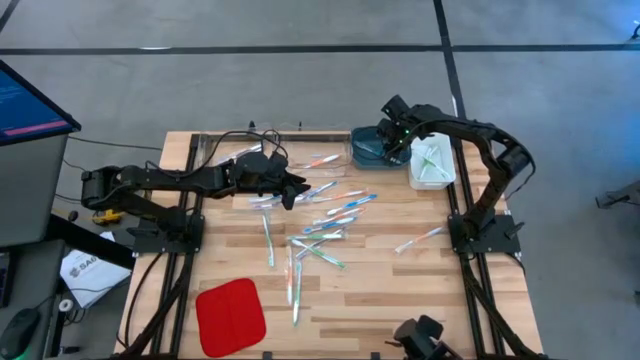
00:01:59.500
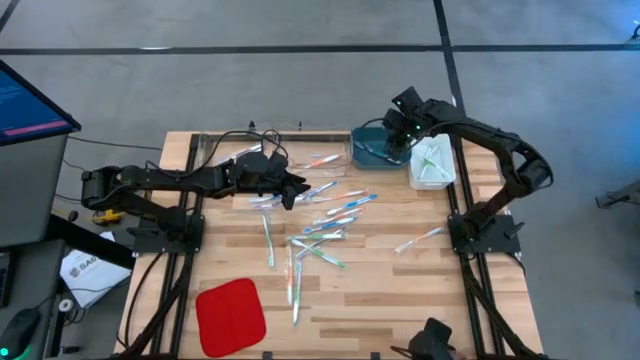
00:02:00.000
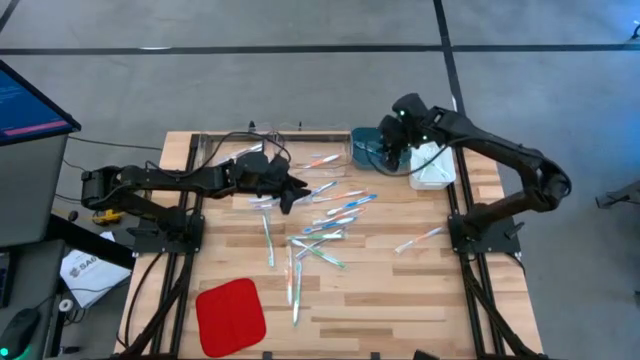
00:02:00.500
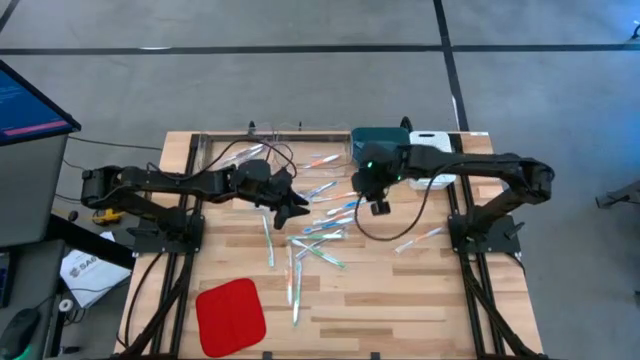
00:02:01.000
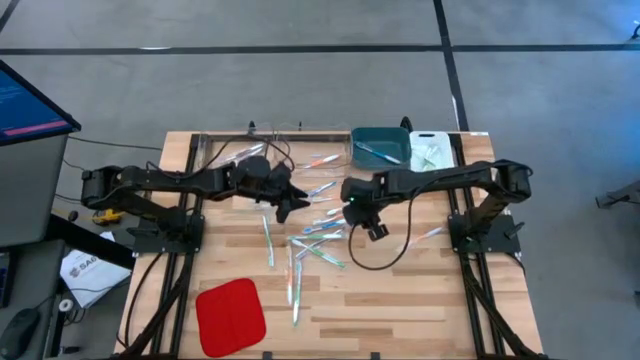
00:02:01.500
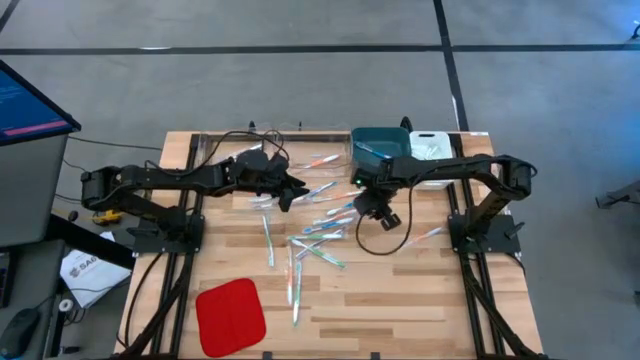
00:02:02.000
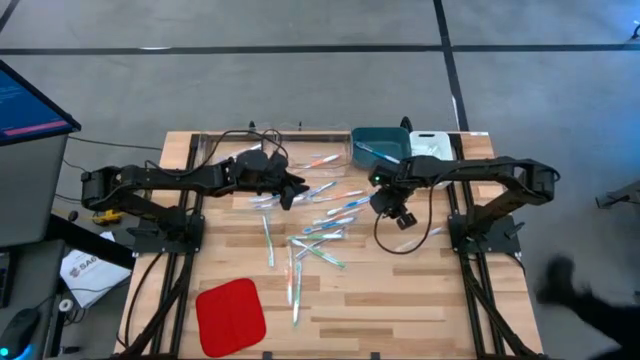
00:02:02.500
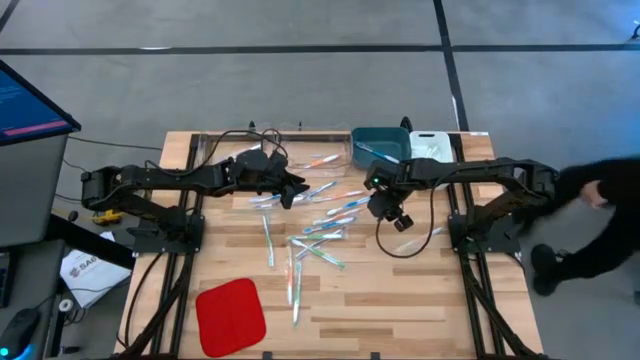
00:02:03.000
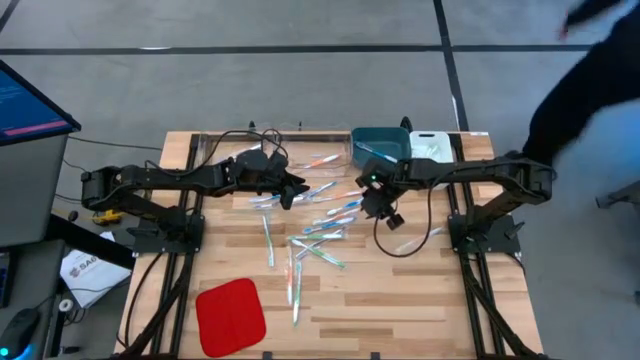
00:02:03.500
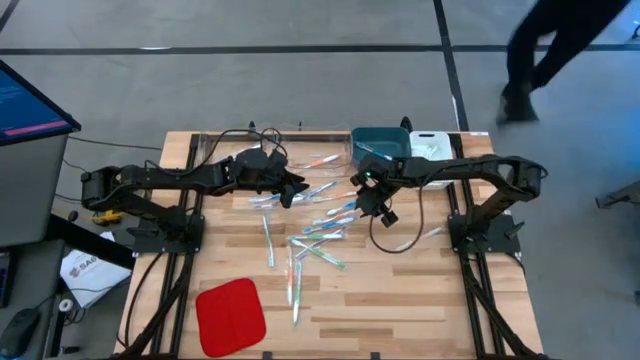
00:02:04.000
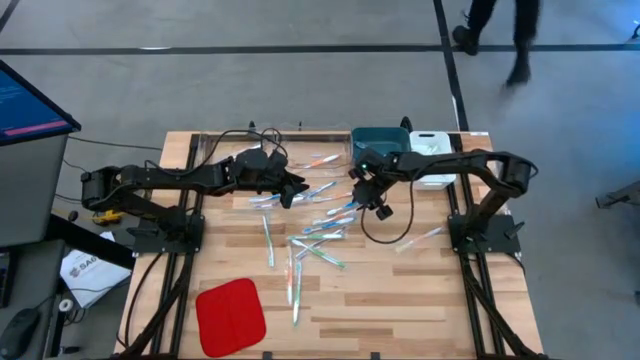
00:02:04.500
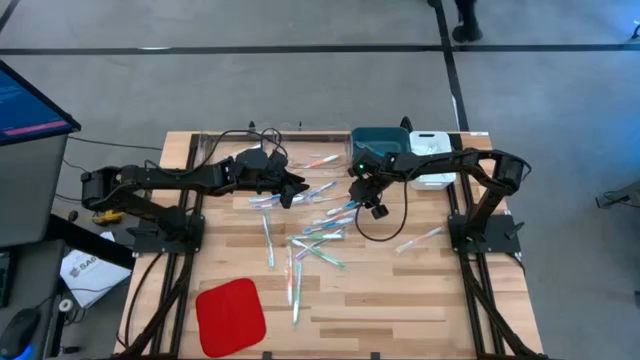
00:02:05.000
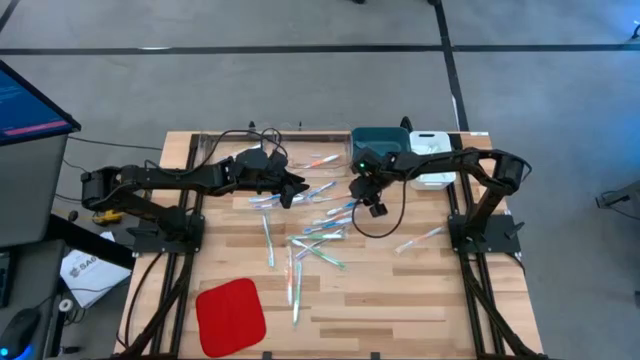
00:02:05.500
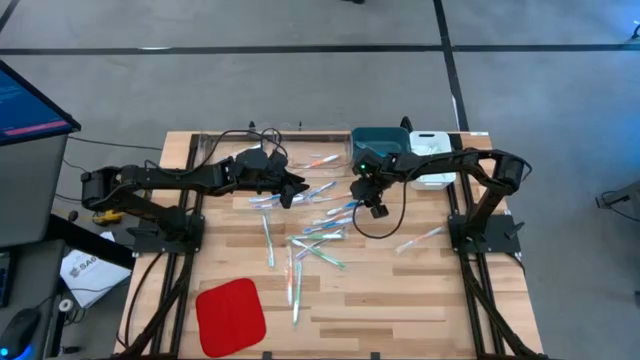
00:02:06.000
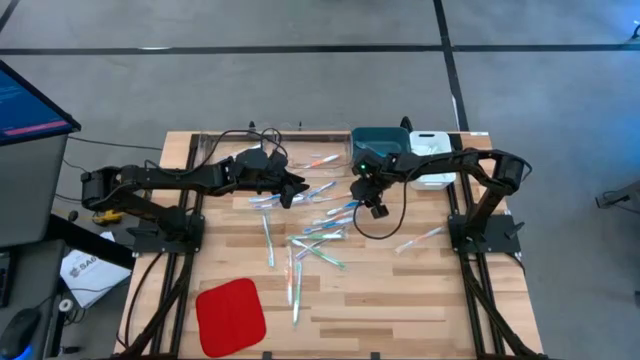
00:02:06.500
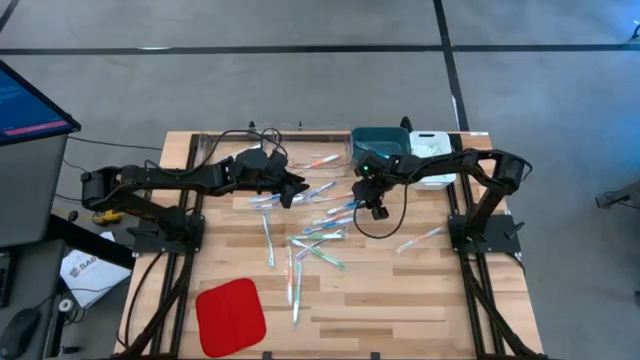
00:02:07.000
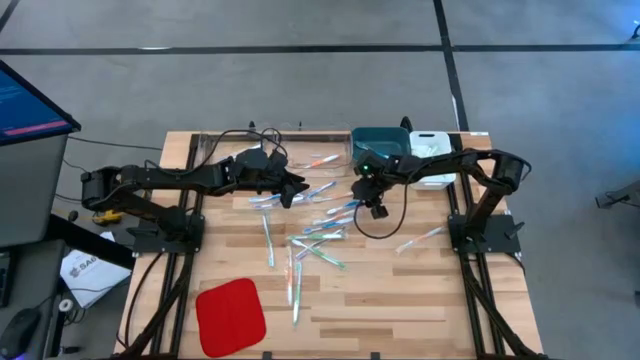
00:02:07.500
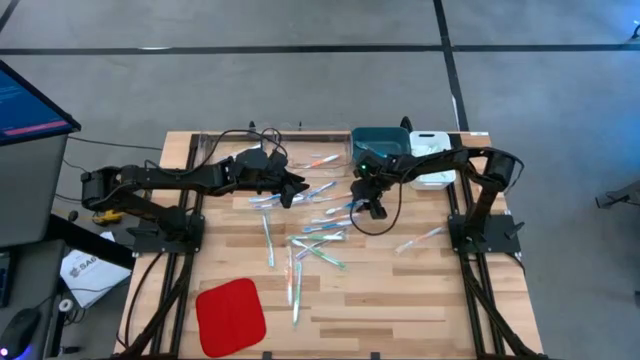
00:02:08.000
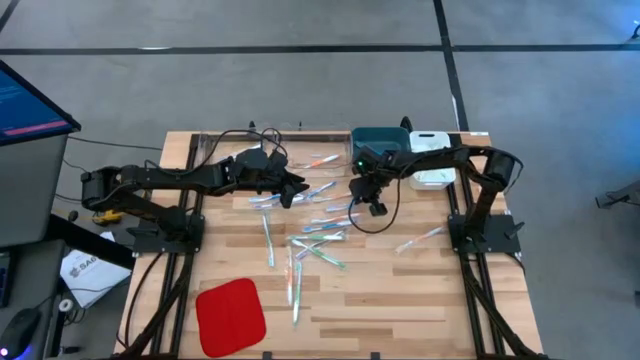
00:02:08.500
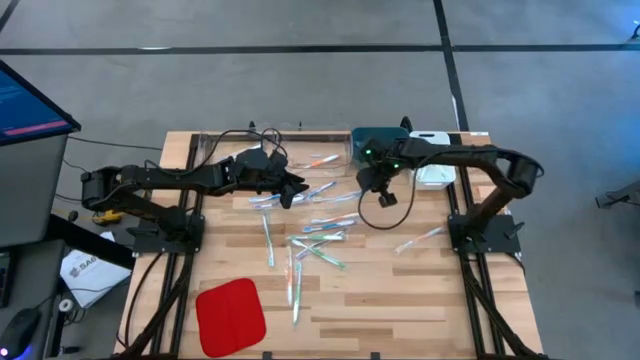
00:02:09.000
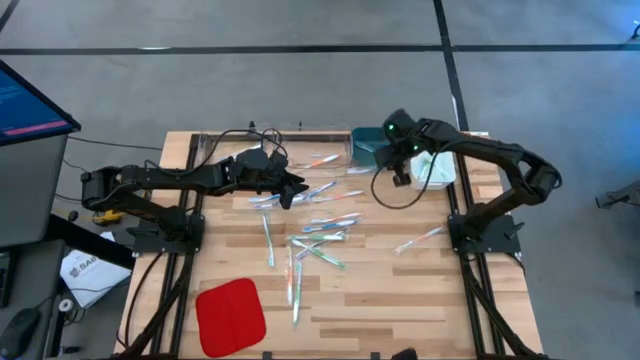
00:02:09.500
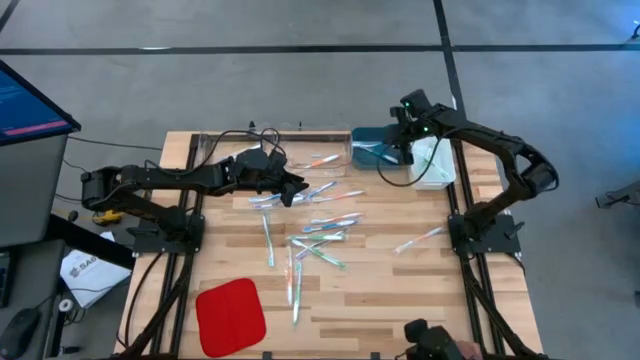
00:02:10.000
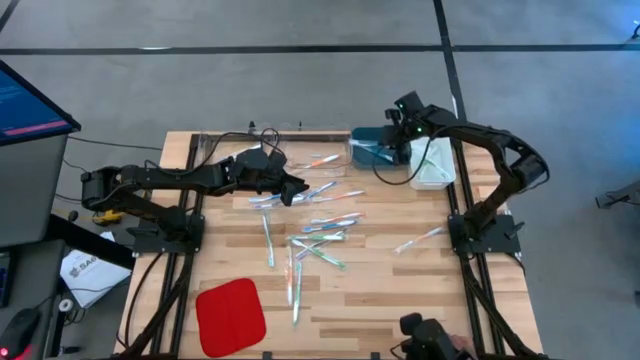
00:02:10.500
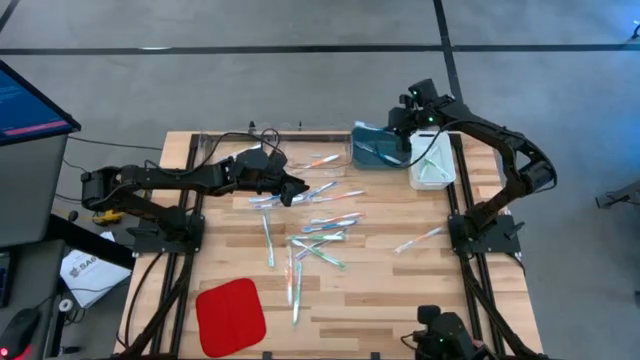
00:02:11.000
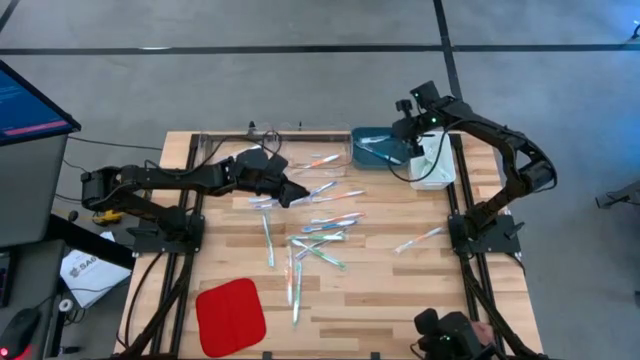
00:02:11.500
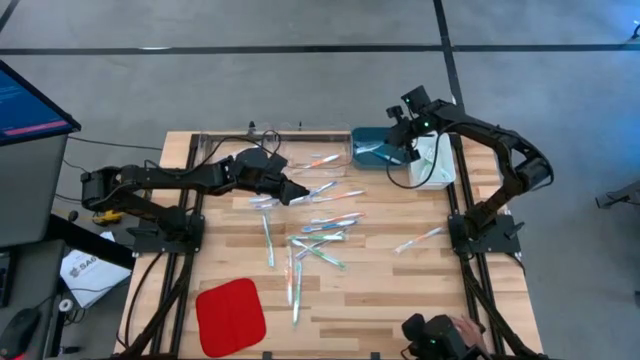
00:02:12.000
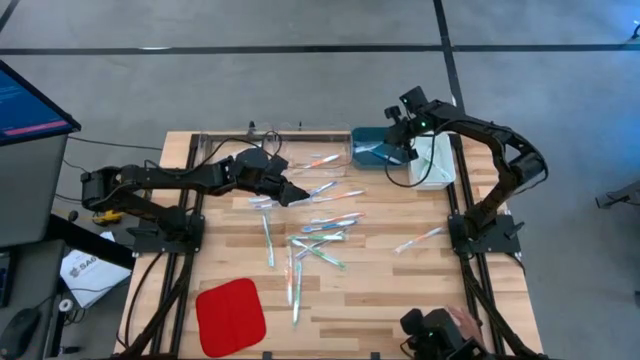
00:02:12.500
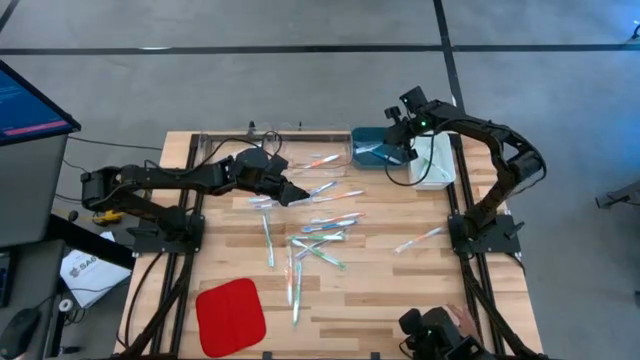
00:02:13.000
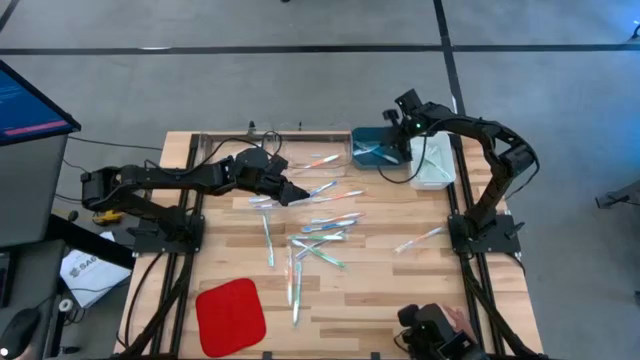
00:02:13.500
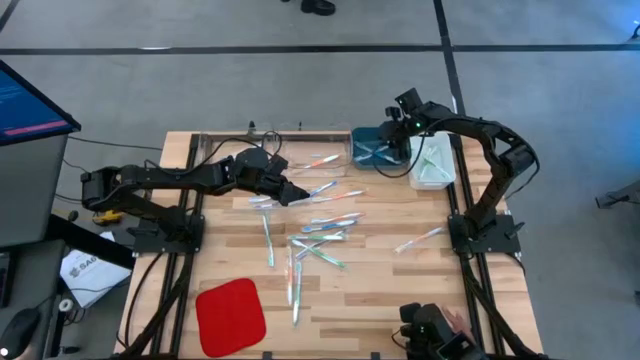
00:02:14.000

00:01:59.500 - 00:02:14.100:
Task: Pick & Place Toothbrushes
Put the blue toothbrush into the blue bin

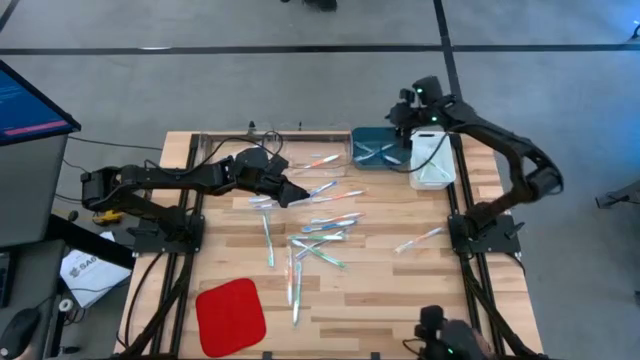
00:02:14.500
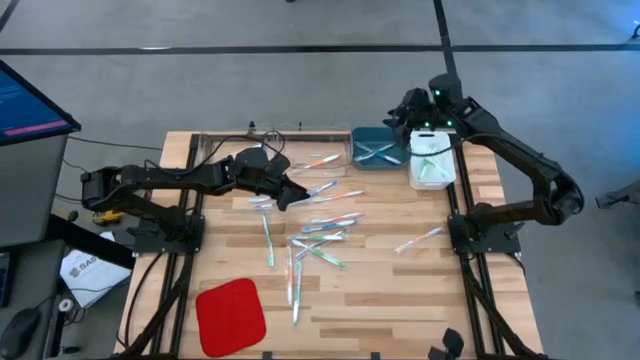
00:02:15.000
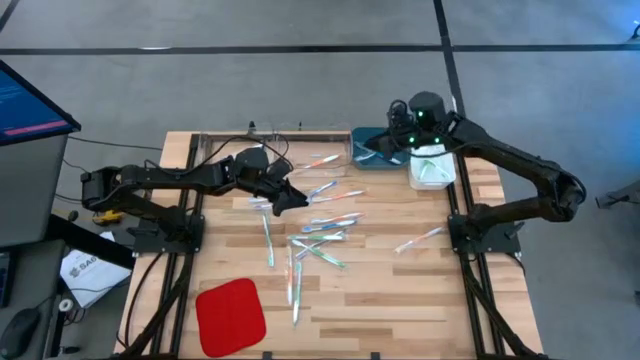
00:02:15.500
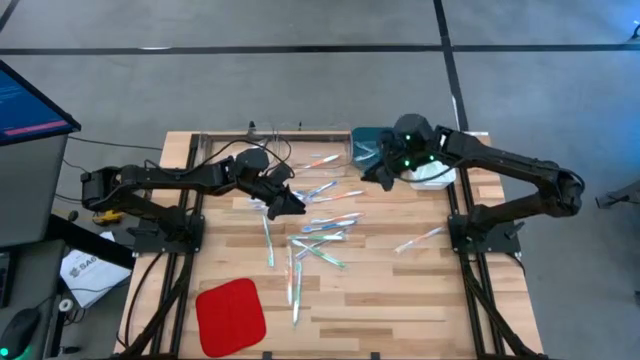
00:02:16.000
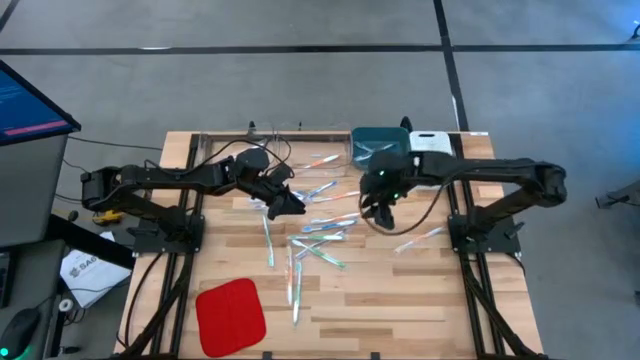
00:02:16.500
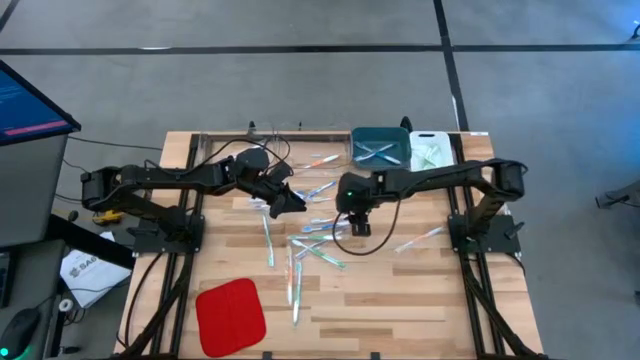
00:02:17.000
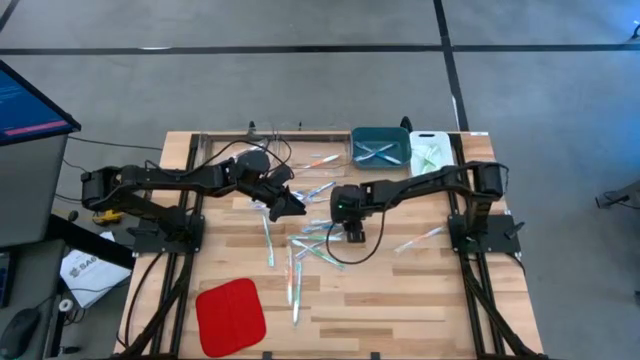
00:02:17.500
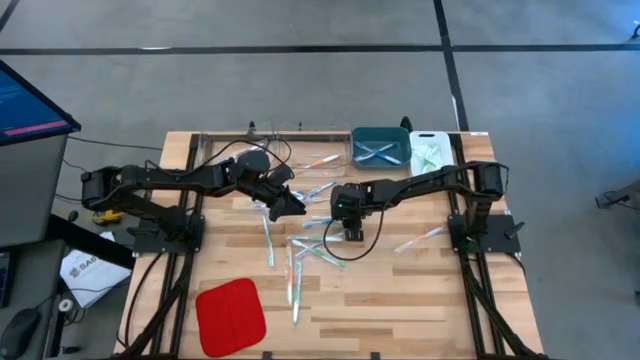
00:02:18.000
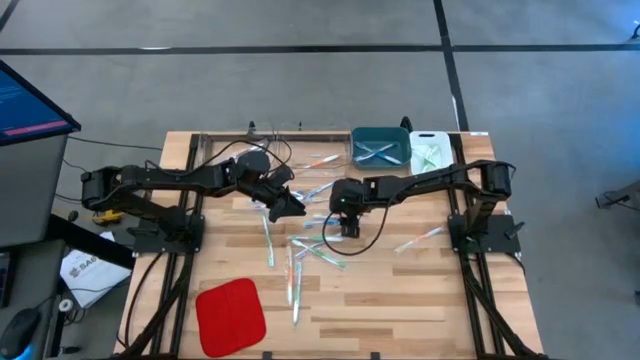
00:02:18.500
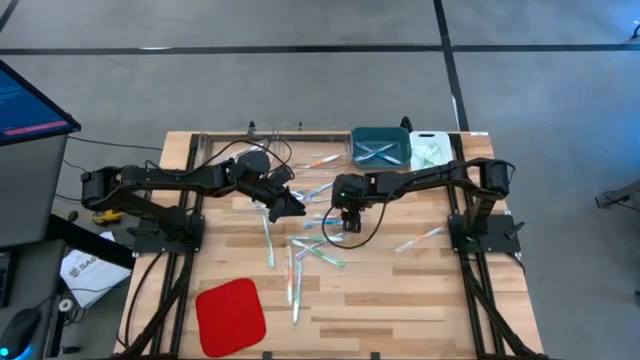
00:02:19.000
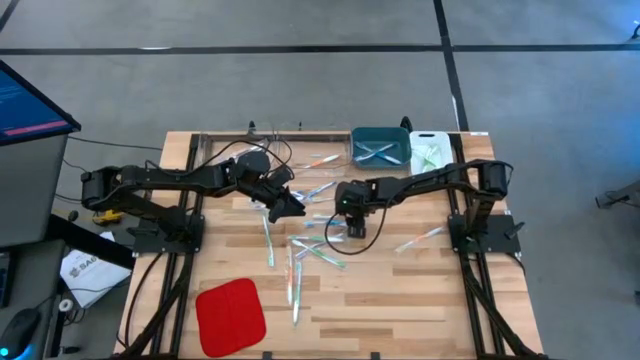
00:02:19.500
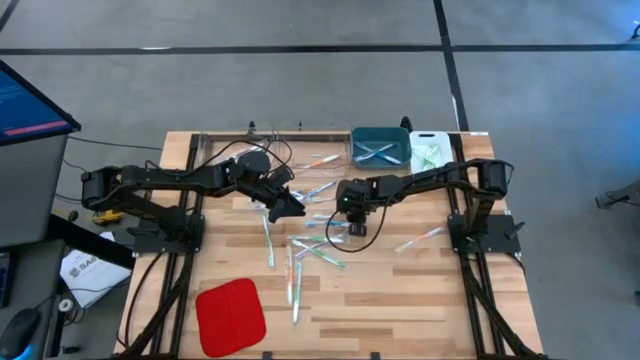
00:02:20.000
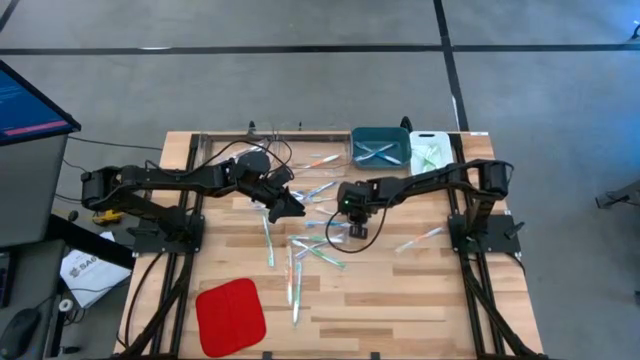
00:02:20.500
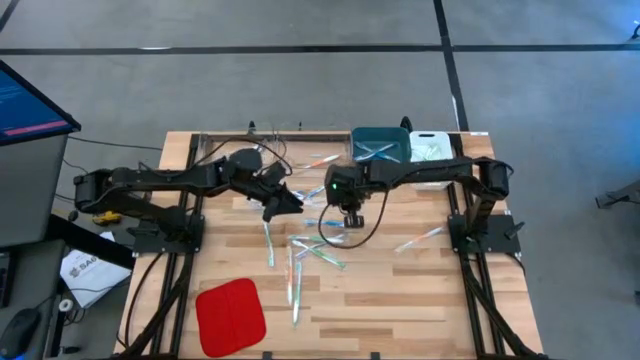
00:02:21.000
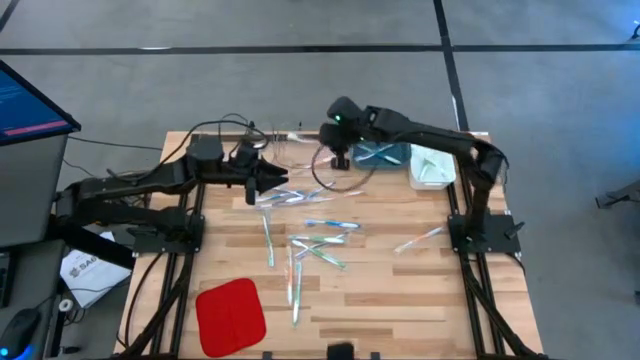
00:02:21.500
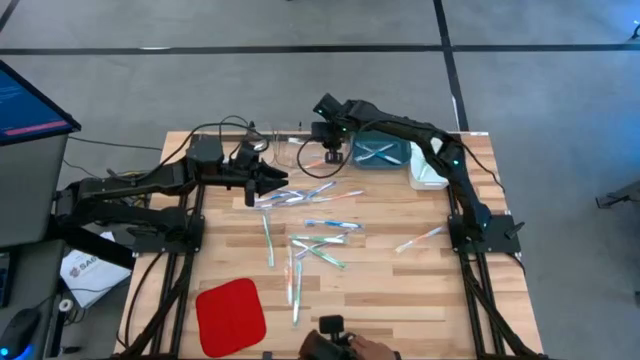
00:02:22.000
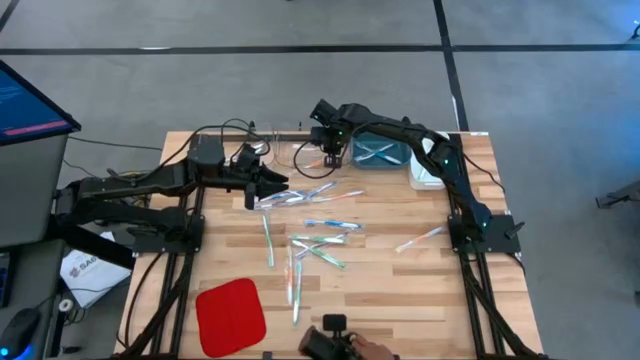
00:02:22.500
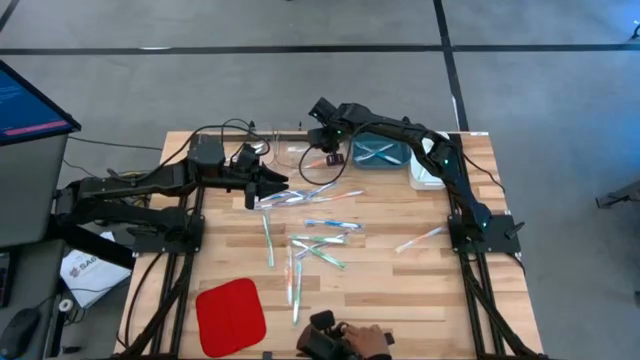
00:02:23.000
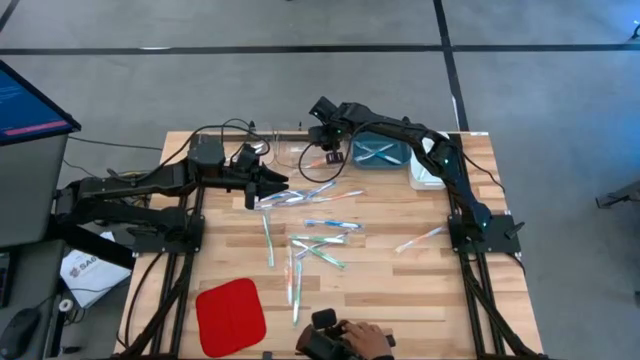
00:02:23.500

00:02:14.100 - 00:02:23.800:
Put the orange toothbrush into the right transparent bin
